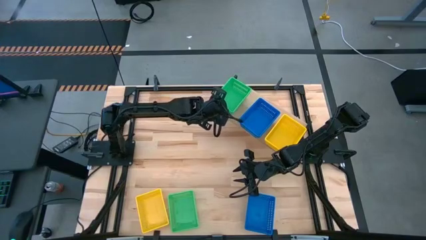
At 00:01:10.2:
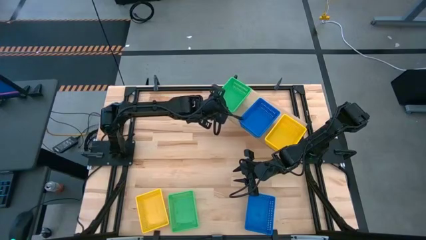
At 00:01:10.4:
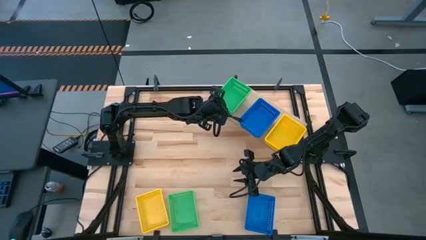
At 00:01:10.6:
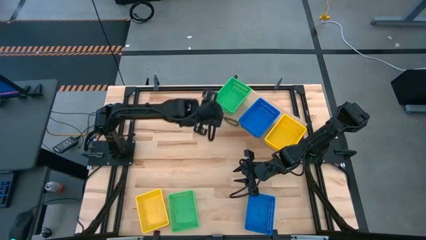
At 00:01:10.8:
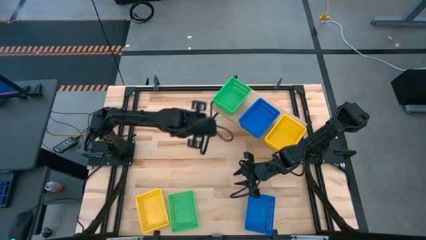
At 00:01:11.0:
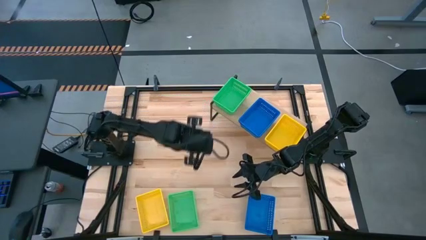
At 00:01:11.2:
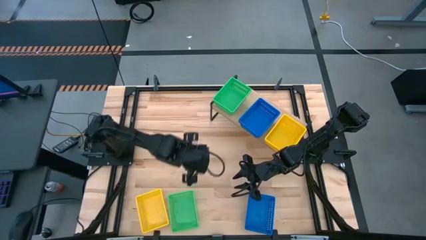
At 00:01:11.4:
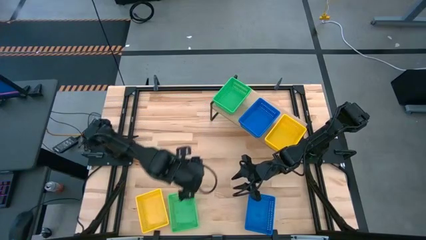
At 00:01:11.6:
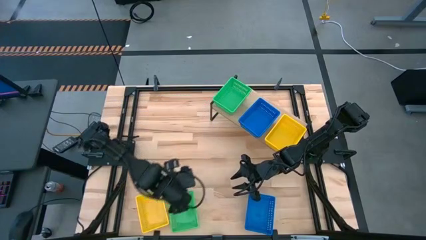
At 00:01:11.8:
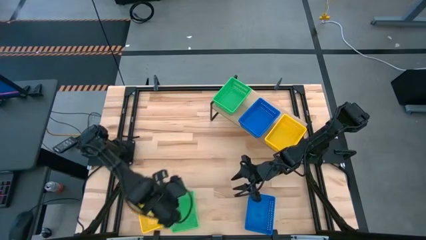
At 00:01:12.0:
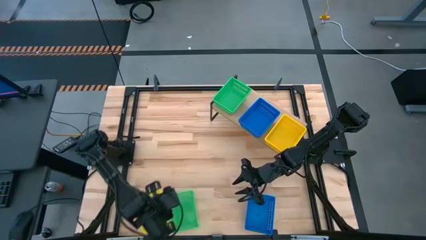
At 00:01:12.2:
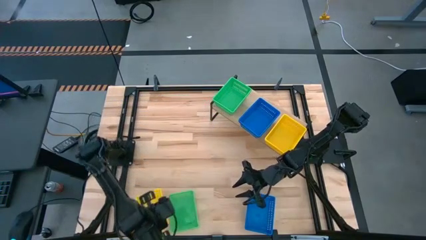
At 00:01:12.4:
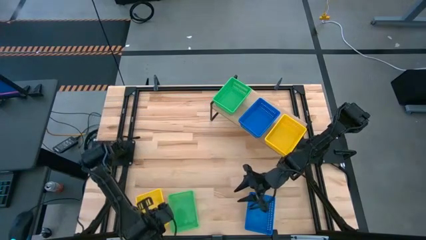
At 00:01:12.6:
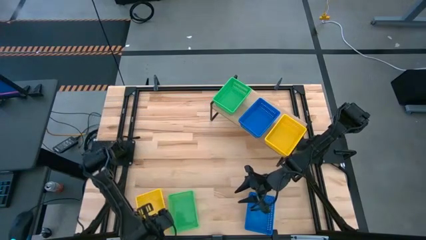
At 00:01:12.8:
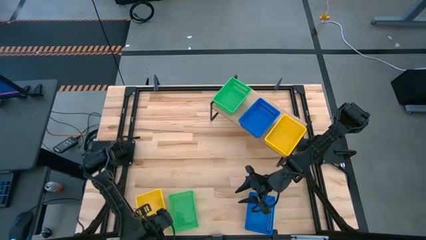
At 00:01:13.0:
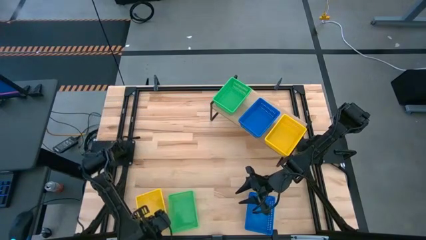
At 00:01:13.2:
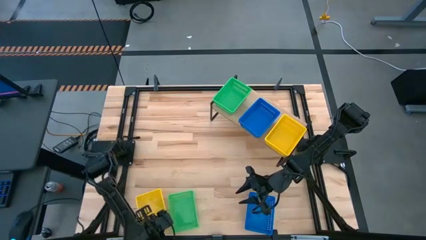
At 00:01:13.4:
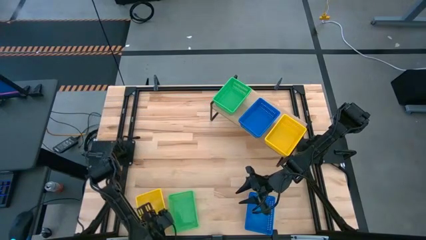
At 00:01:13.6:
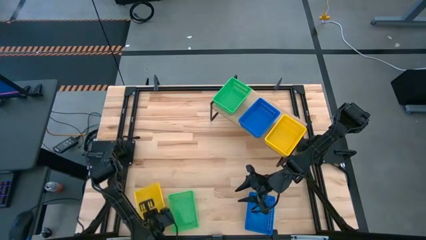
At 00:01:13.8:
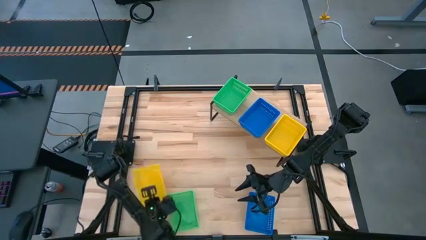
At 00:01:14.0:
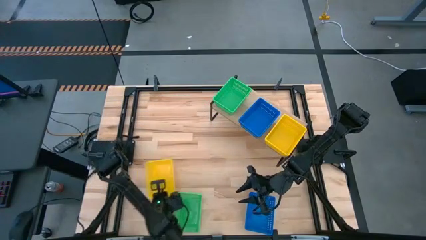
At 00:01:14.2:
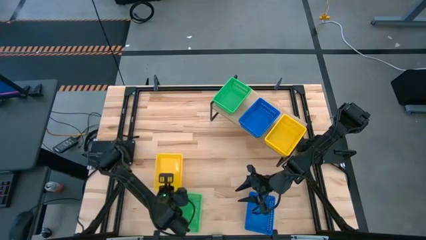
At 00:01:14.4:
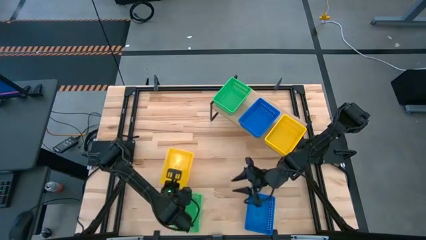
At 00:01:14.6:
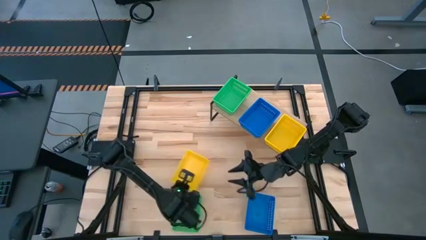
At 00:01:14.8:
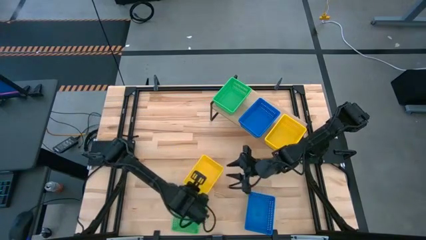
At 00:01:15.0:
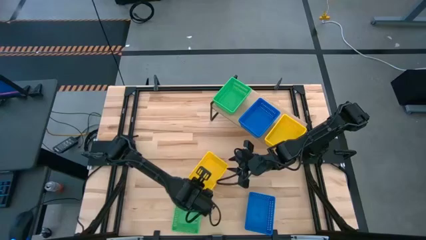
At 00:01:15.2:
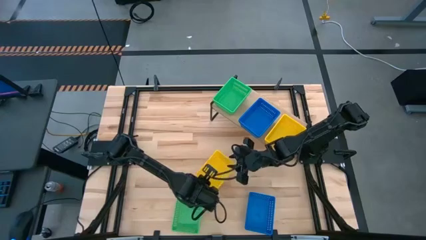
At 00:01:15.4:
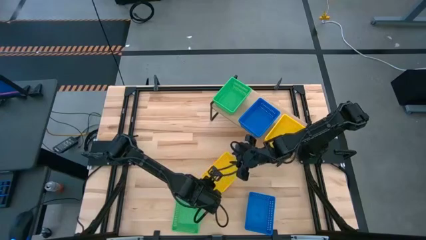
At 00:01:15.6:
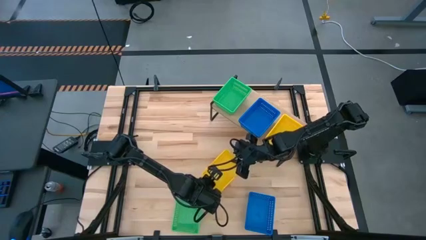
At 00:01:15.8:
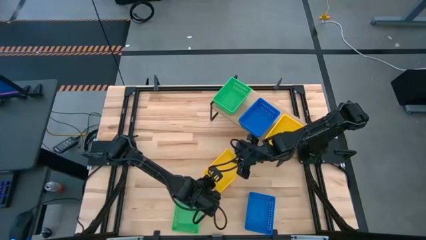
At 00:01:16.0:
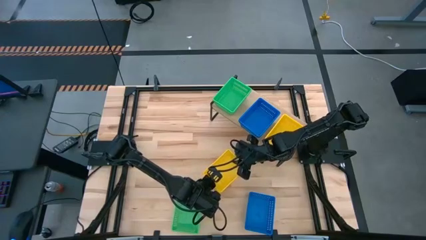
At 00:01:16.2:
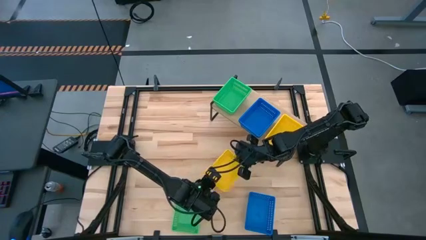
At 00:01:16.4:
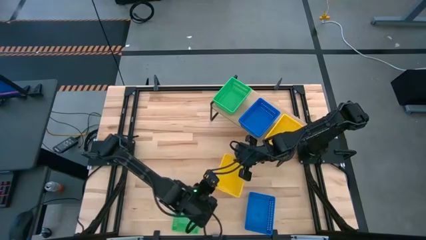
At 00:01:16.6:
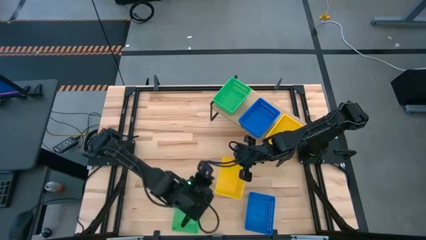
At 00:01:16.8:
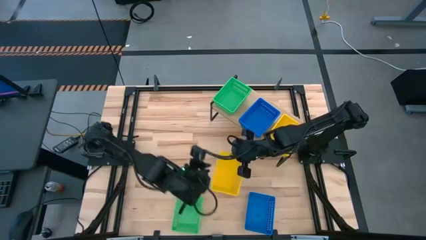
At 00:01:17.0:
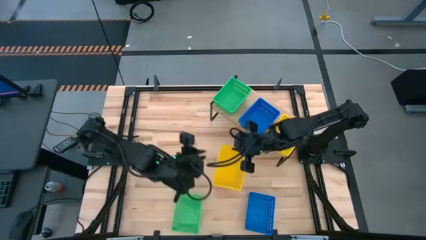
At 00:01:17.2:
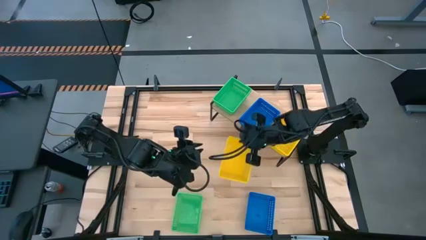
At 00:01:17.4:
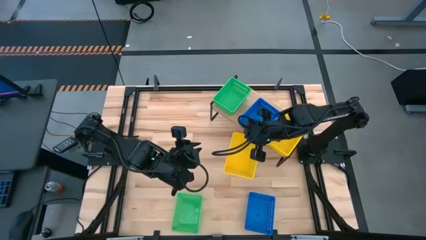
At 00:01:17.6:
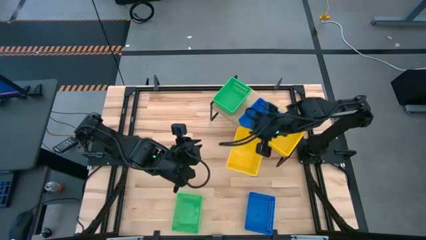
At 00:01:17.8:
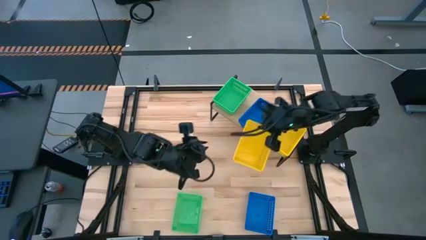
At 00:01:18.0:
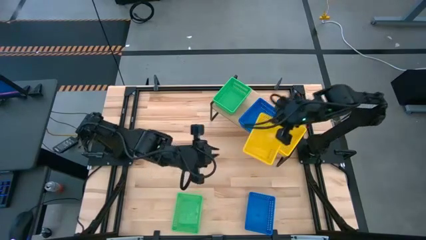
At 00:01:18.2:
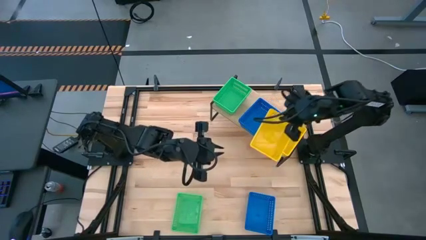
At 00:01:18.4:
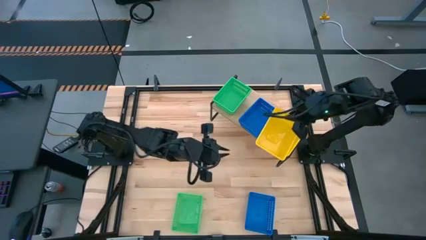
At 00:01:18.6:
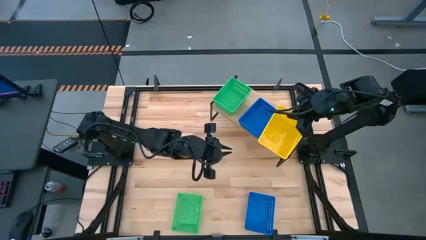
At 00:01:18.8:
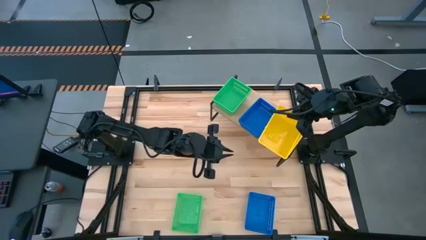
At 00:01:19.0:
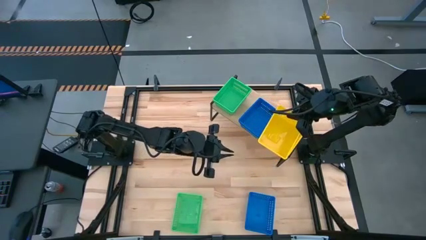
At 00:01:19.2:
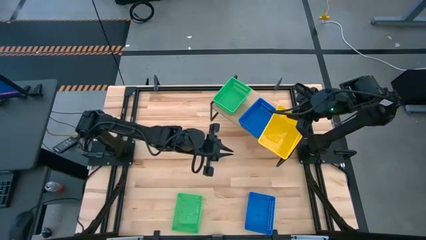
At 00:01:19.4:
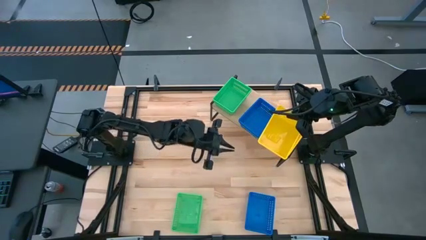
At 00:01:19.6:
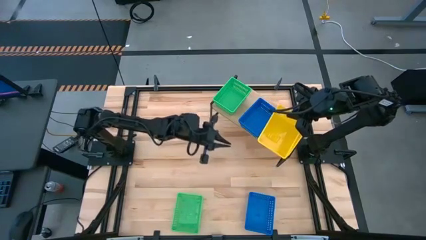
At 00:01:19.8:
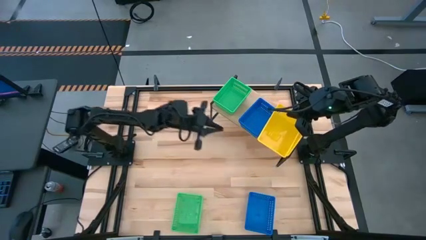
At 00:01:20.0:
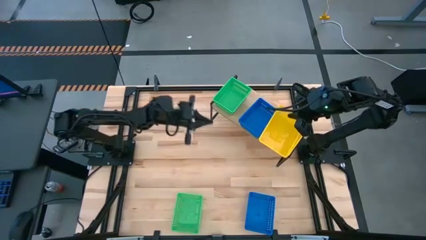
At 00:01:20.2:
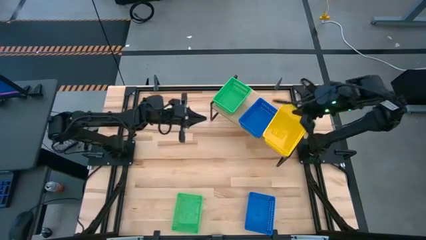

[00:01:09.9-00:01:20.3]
Task: Stack baskets on shelf by color
Stack the yellow bin on top of the yellow bins on the shelf

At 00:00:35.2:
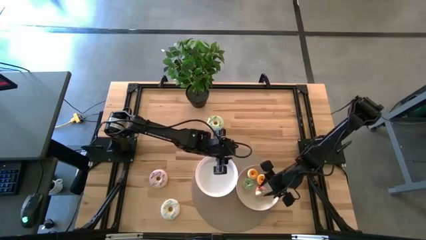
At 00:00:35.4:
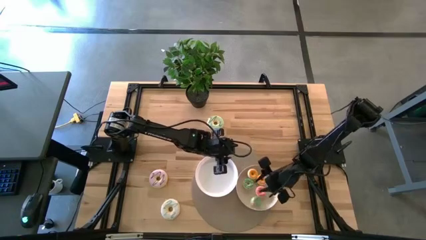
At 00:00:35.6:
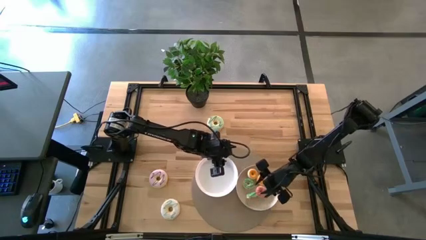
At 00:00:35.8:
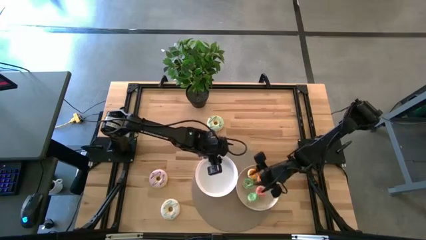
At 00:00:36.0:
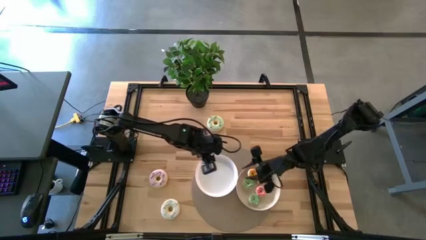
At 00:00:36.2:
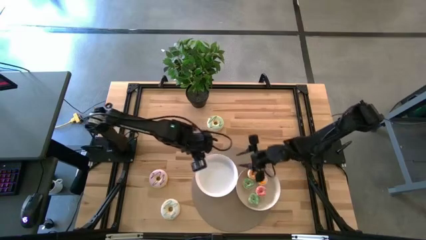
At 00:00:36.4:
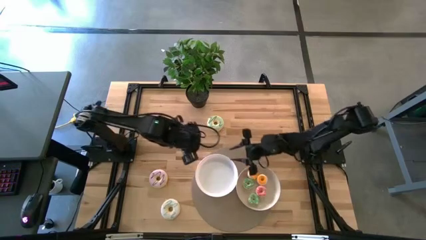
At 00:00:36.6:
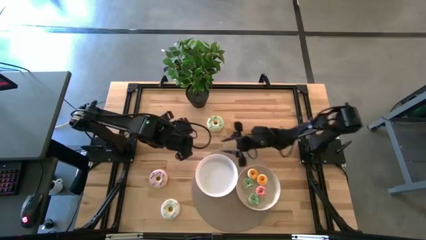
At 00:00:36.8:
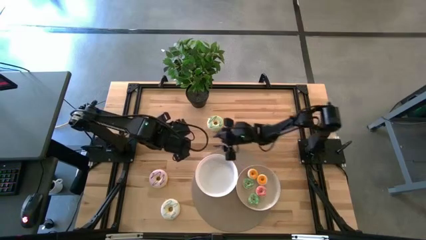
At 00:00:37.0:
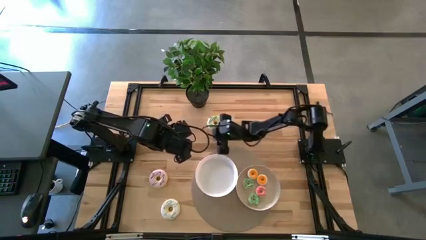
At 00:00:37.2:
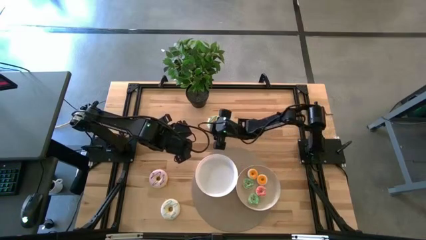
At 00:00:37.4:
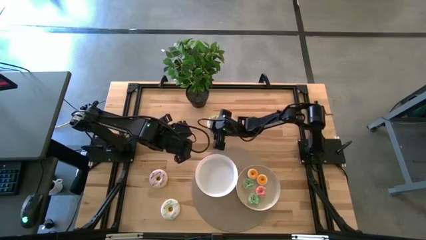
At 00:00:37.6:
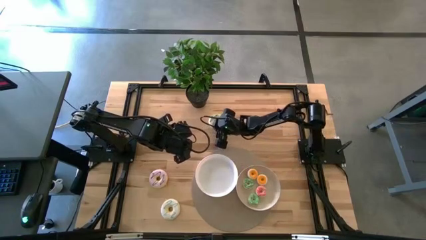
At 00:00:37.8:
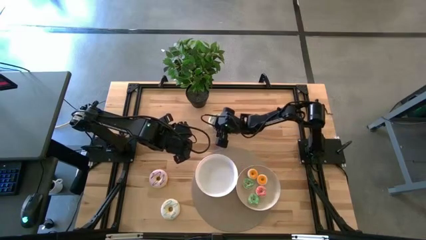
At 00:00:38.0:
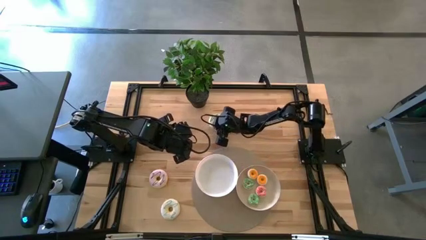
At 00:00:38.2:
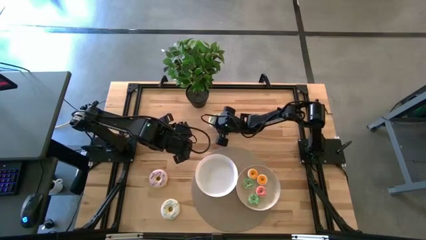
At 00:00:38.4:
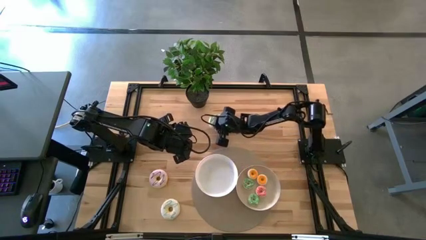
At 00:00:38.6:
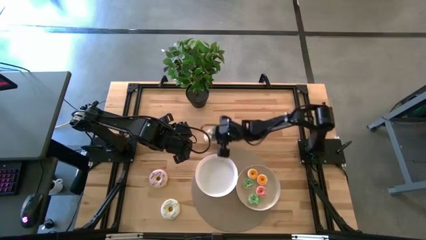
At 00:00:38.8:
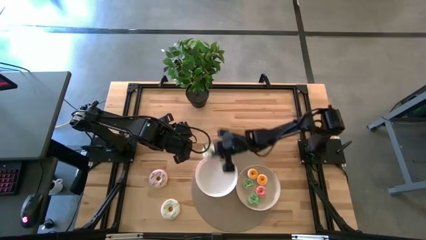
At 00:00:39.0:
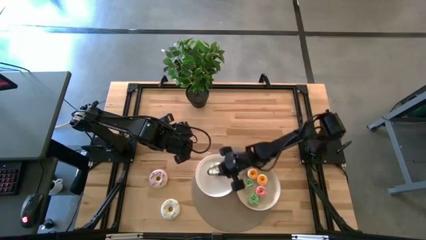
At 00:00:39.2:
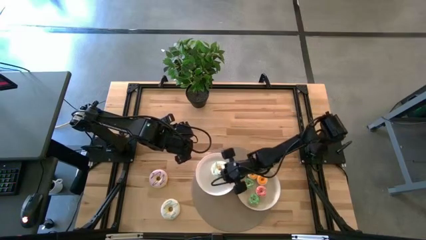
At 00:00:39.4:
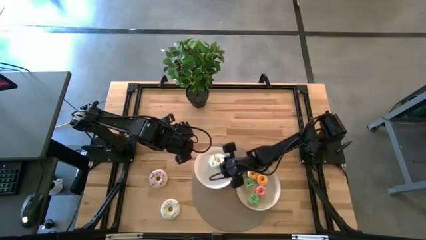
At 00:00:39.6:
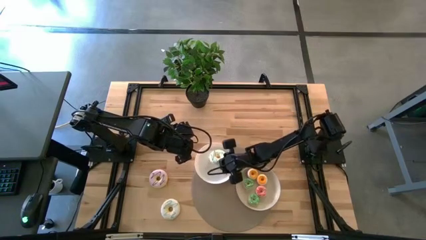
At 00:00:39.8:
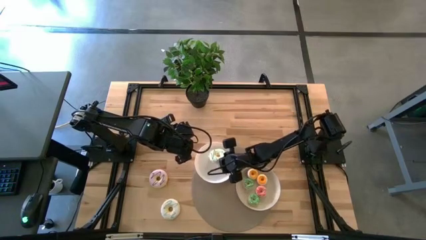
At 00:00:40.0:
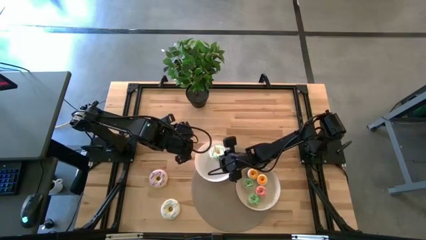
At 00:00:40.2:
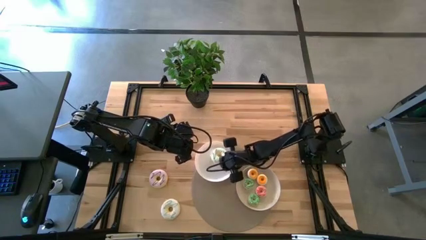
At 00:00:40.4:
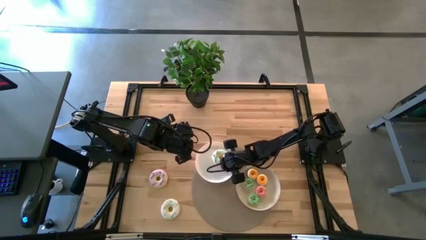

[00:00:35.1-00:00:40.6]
Task: Pick & Place donuts
Put the big light green doughnut on the white plate

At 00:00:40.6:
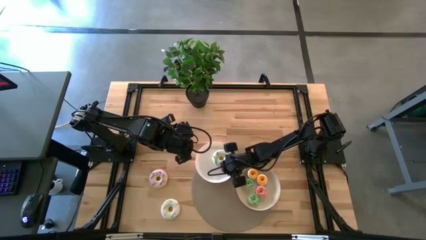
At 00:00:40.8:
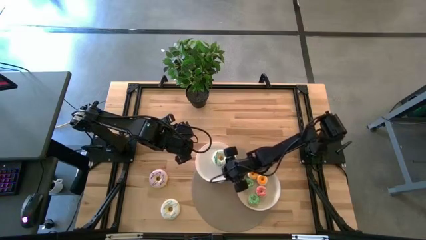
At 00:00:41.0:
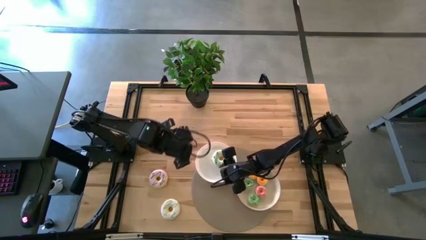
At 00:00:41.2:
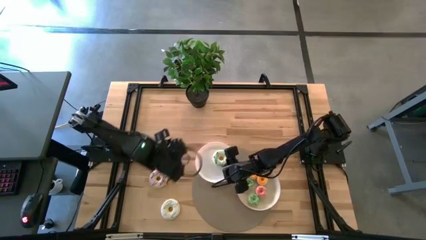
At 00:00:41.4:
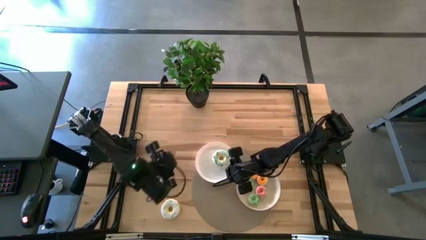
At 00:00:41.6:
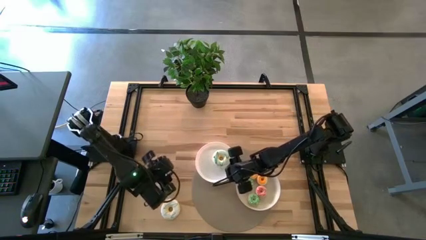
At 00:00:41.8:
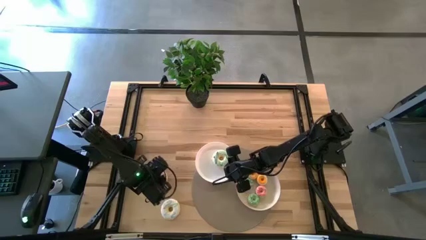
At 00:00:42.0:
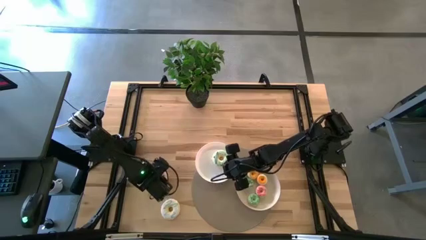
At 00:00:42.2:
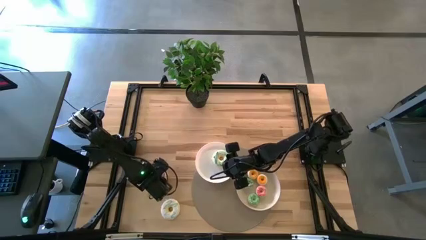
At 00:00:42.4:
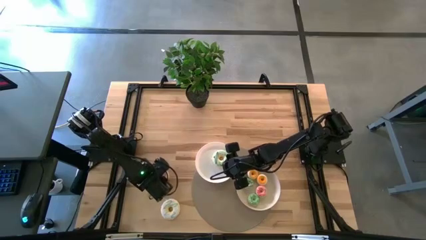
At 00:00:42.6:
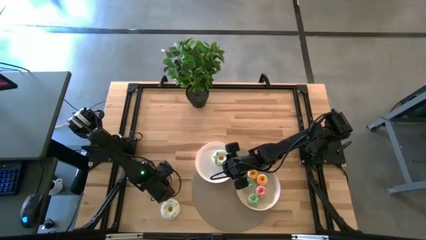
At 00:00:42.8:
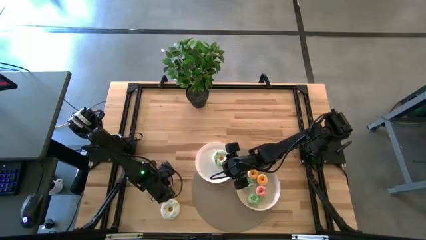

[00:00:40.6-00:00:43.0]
Put the big light purple doughnut on the white plate
